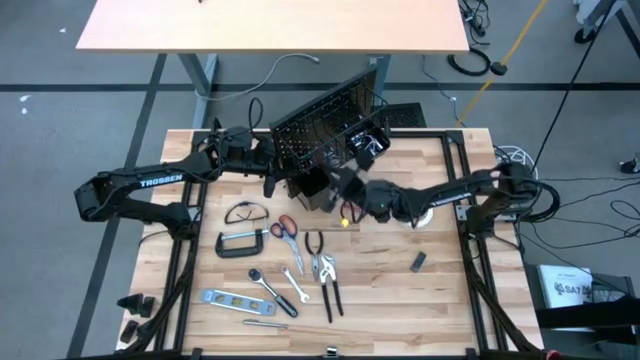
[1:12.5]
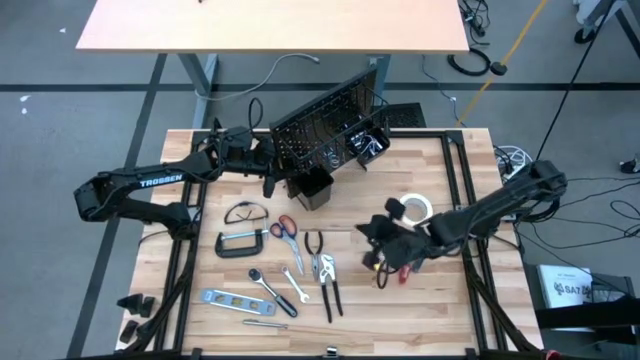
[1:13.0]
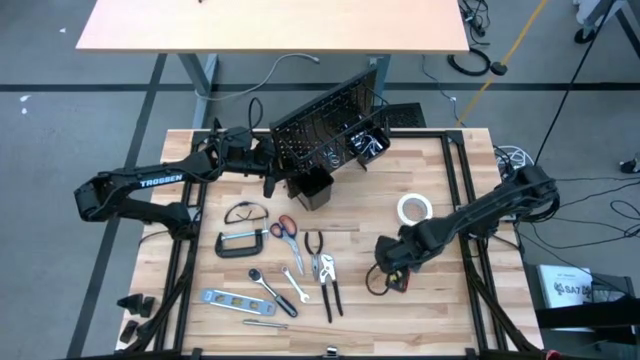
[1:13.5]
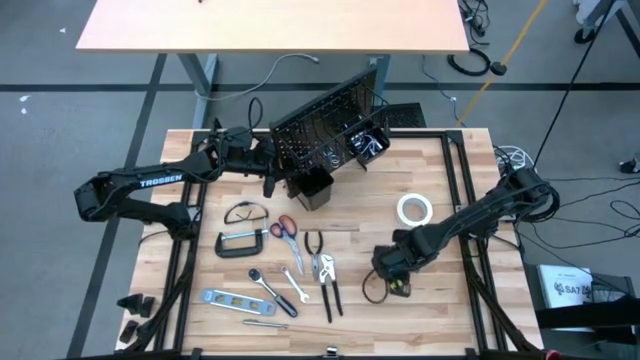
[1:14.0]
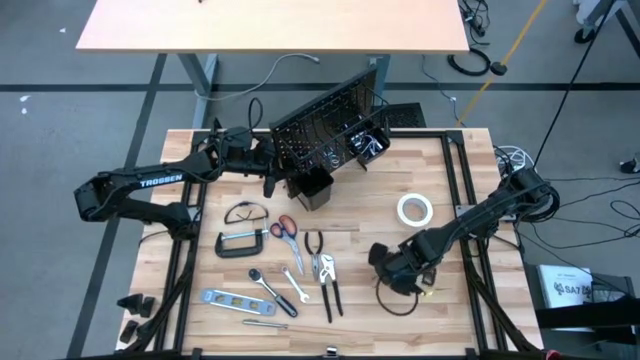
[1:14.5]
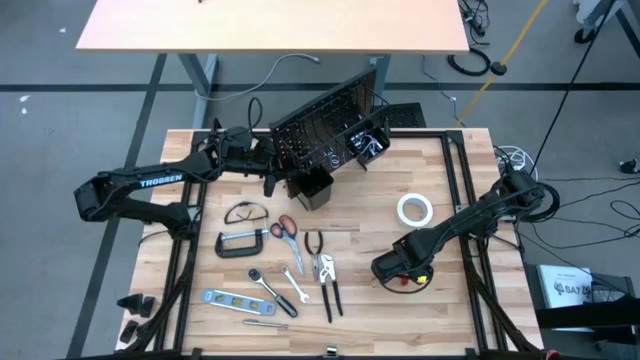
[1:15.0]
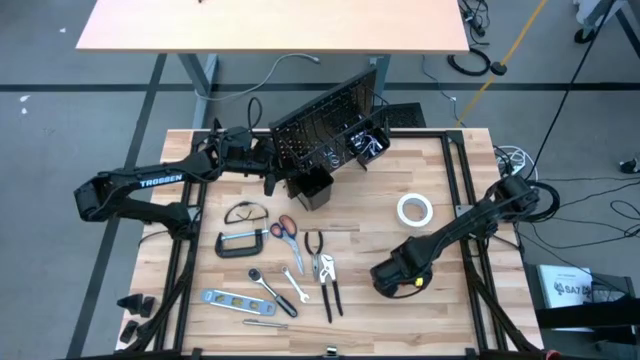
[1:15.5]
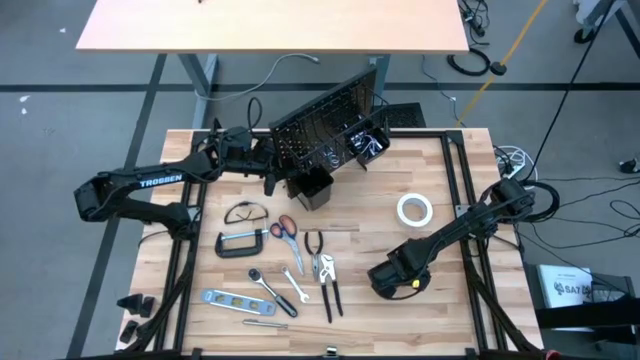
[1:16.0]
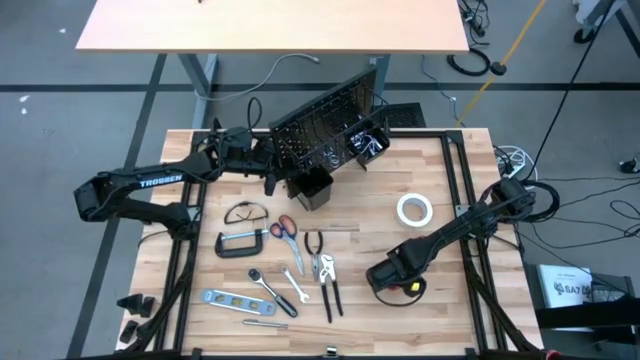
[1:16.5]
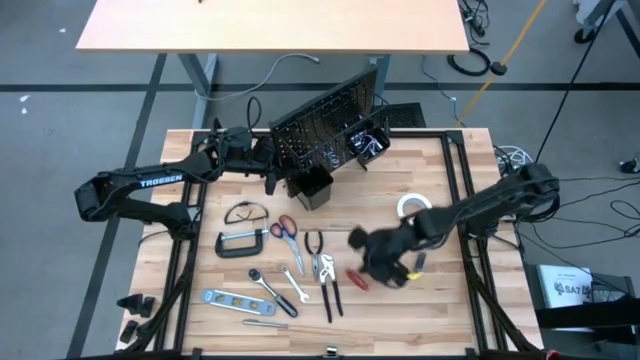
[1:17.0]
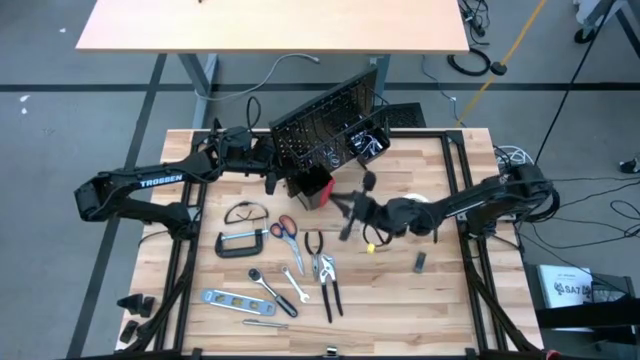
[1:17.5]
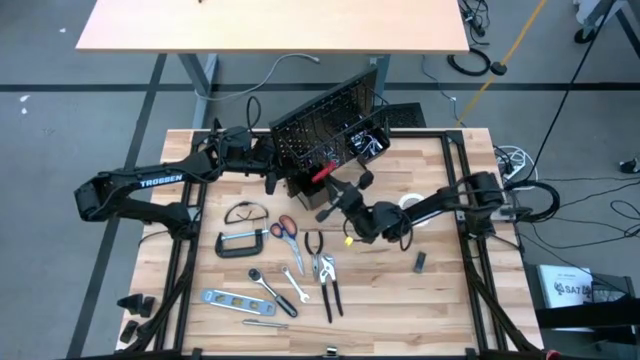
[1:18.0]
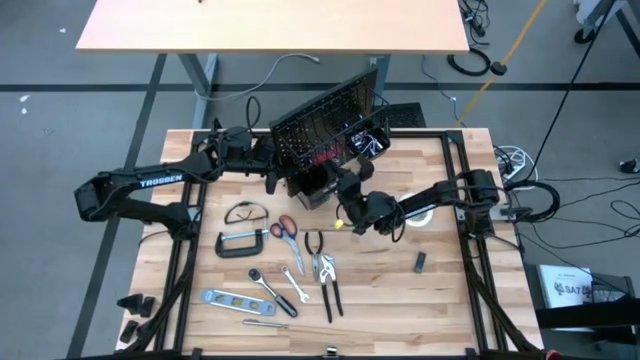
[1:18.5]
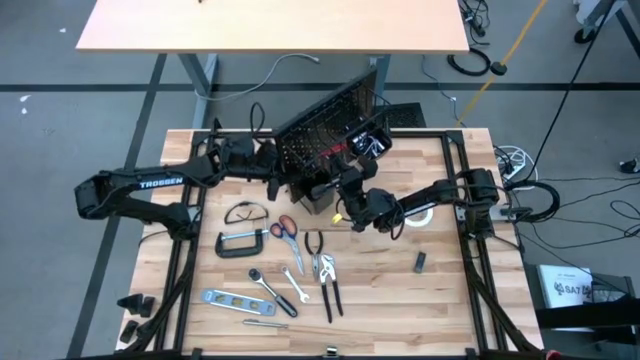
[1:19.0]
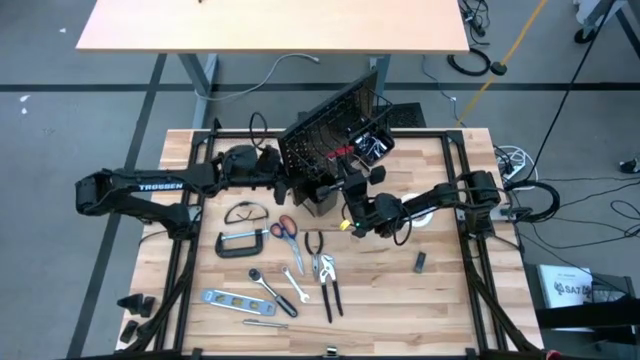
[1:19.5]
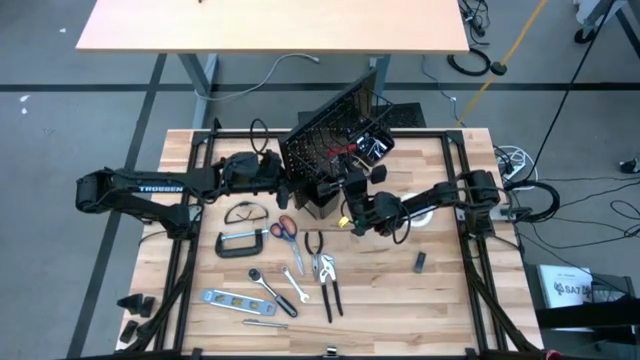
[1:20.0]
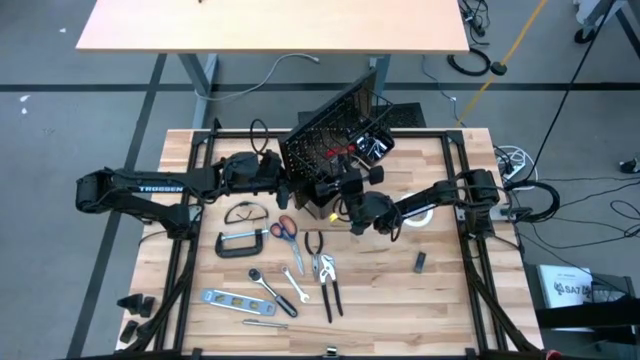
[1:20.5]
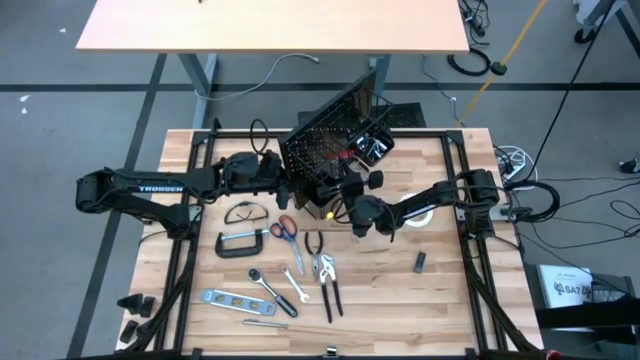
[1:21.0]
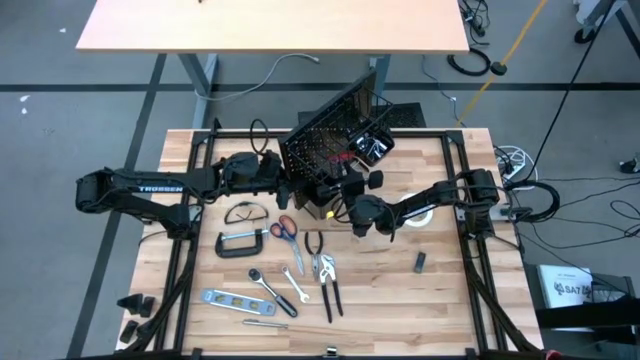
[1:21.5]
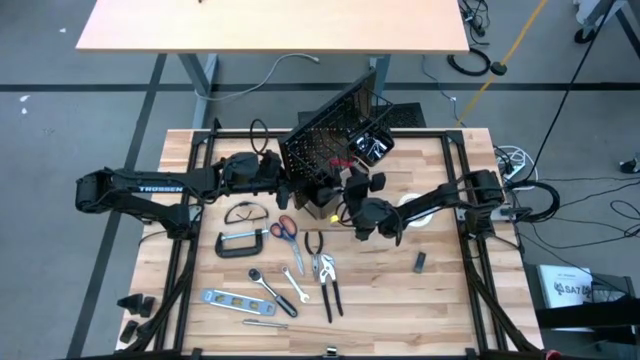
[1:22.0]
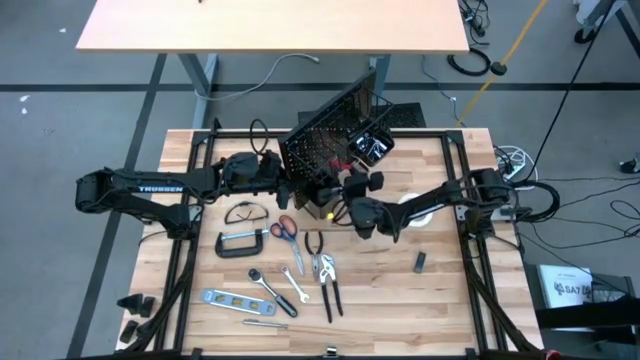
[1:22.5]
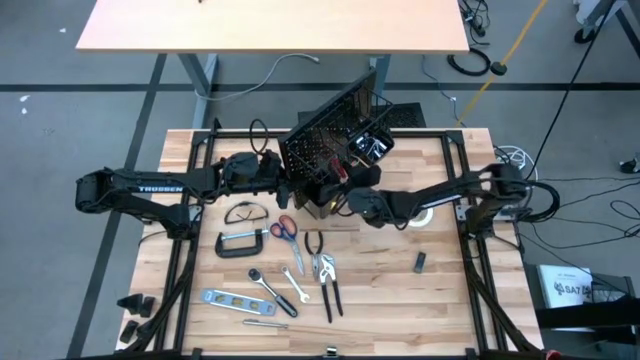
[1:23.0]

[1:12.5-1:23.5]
Task: Hang tools onto peg board
Hang the allen wrench on the peg board

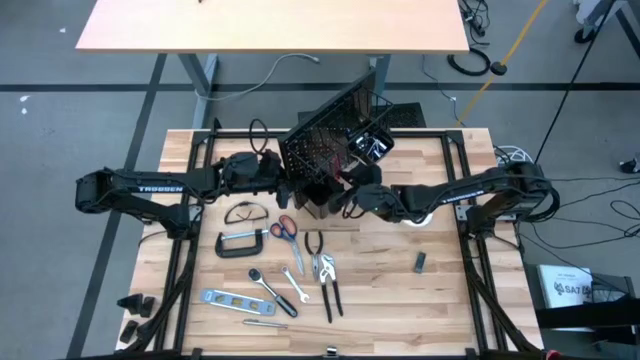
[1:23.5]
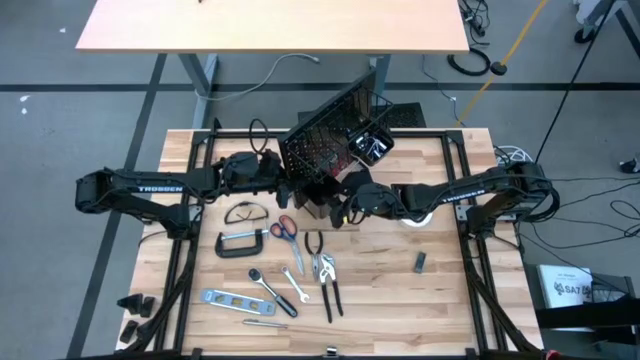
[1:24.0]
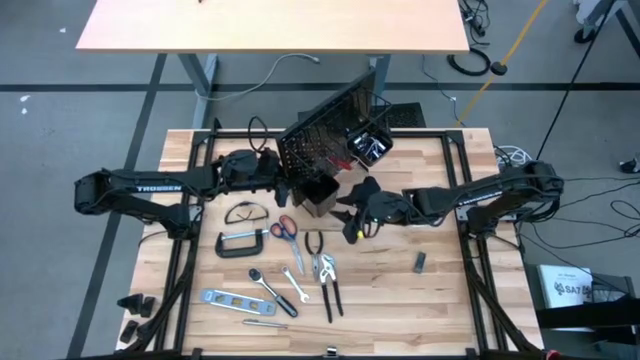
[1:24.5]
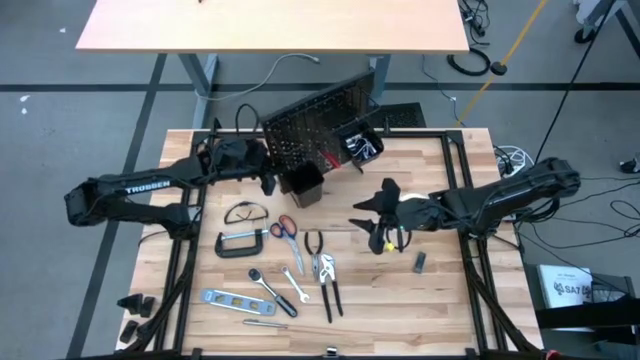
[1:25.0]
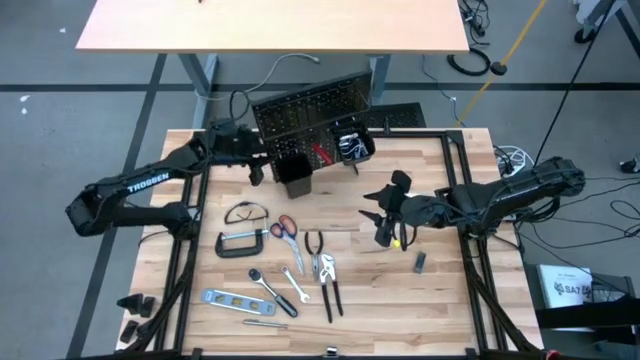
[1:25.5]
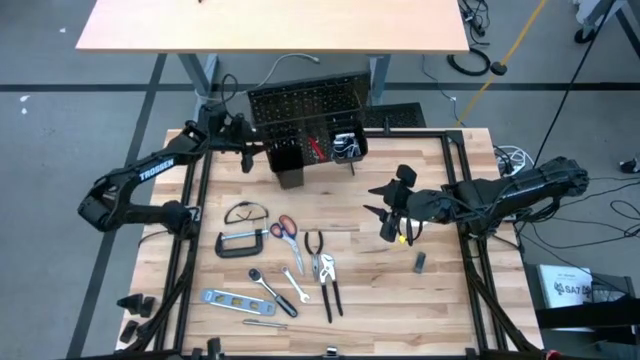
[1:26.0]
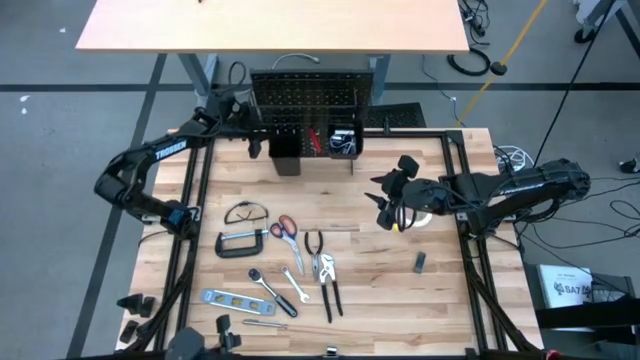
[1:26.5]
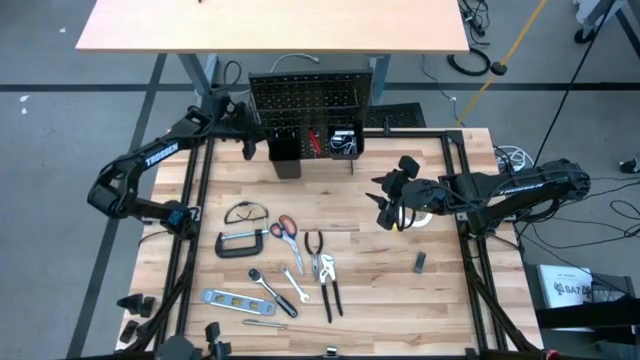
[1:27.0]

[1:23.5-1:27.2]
Adjust the peg board

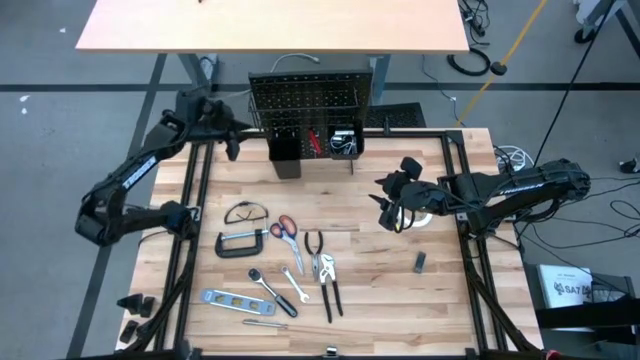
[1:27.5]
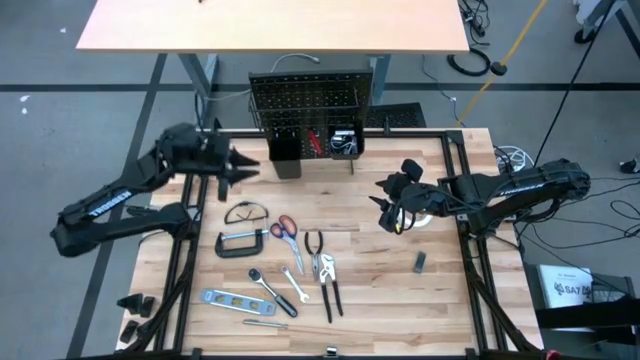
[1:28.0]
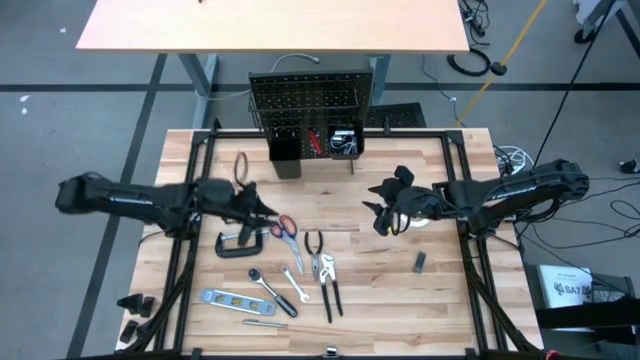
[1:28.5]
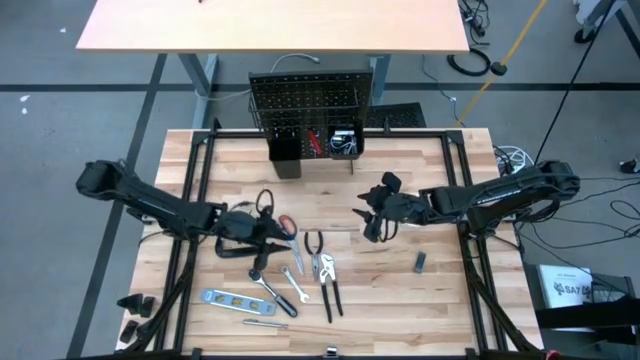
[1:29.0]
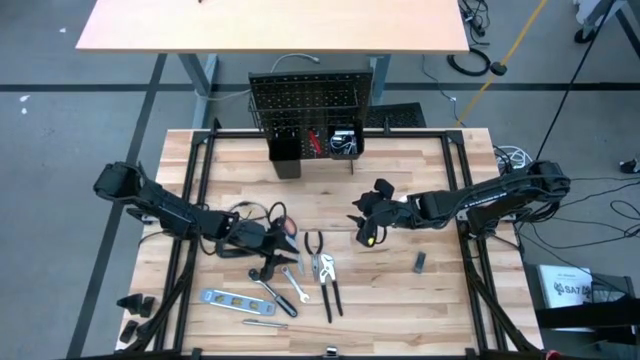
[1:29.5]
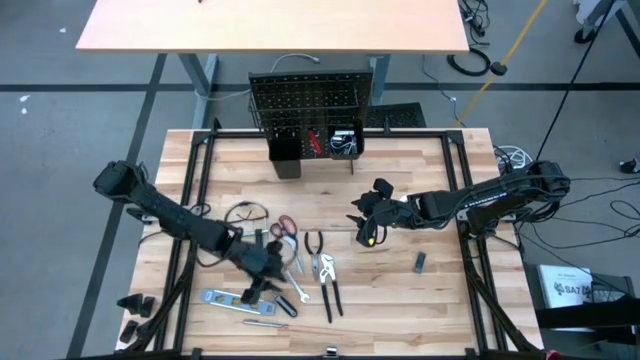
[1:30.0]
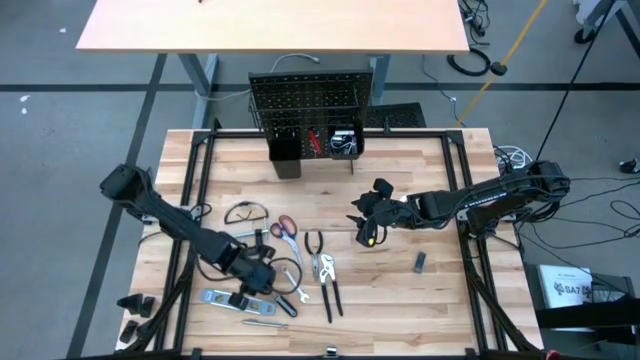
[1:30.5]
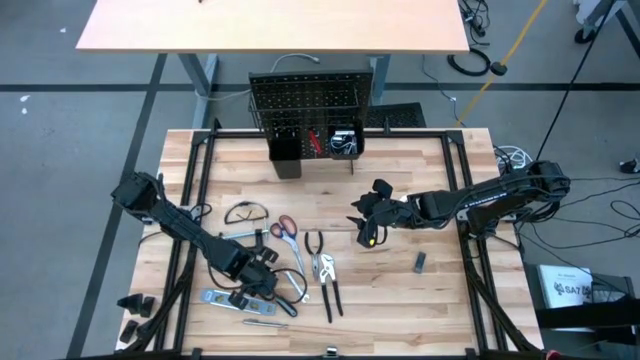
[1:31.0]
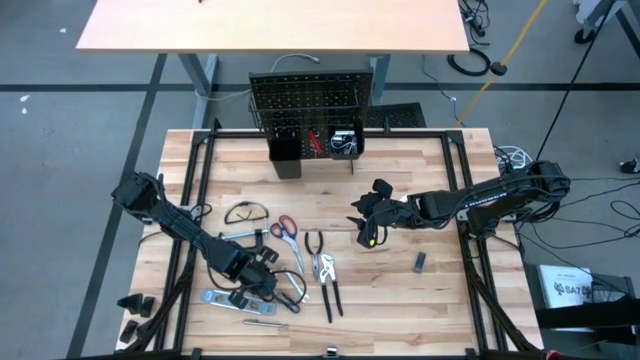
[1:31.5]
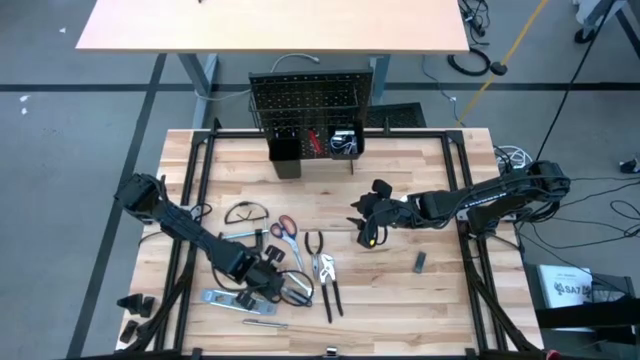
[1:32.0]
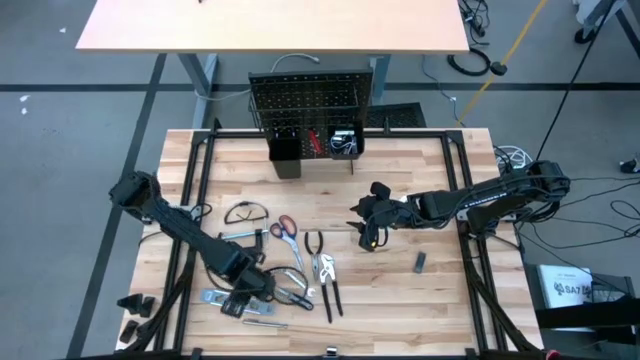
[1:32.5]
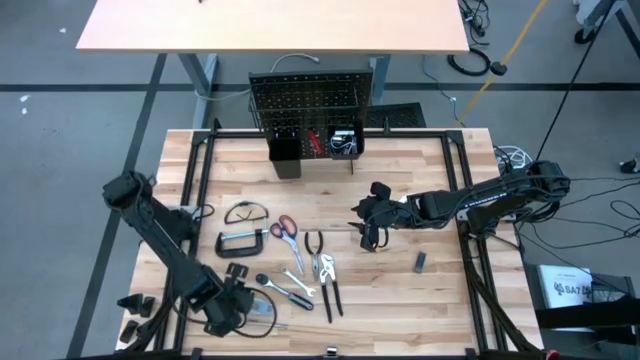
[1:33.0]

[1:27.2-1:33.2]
Adjust the ratchet wrench on the table

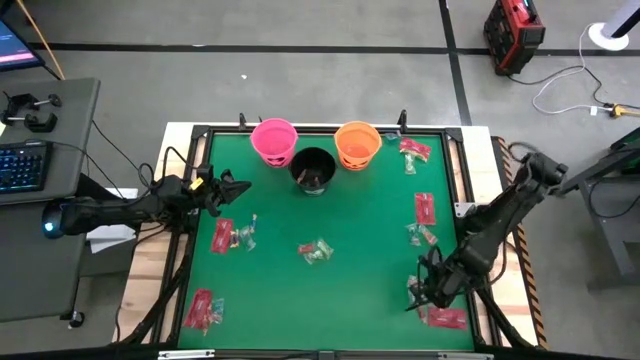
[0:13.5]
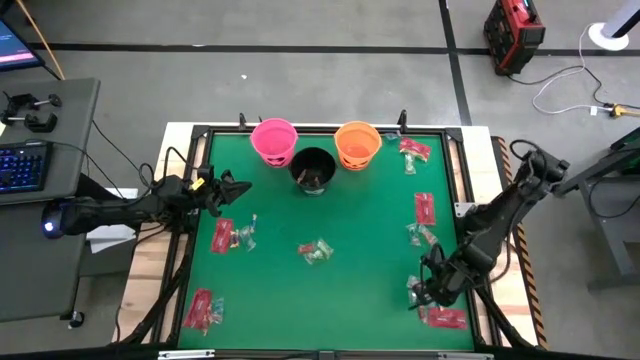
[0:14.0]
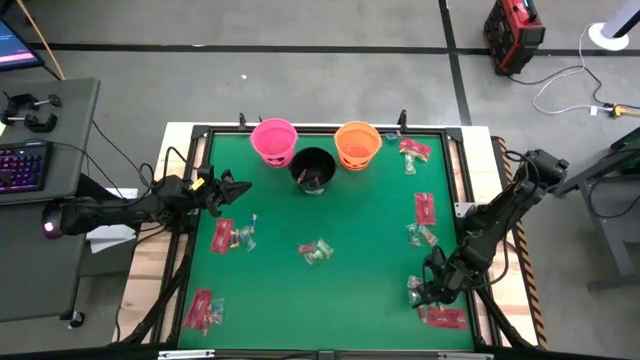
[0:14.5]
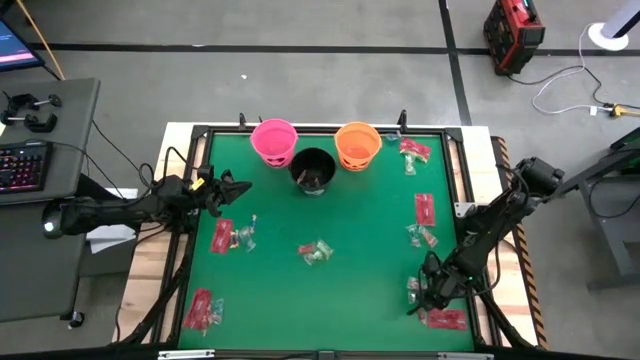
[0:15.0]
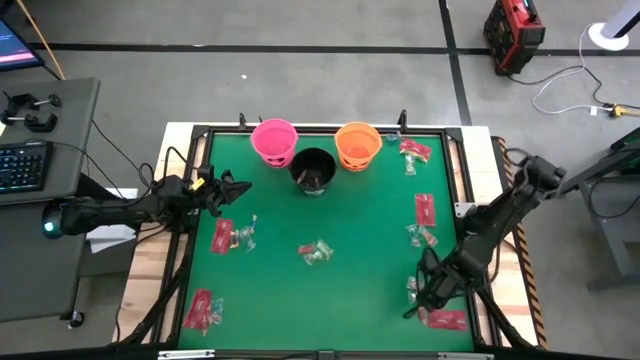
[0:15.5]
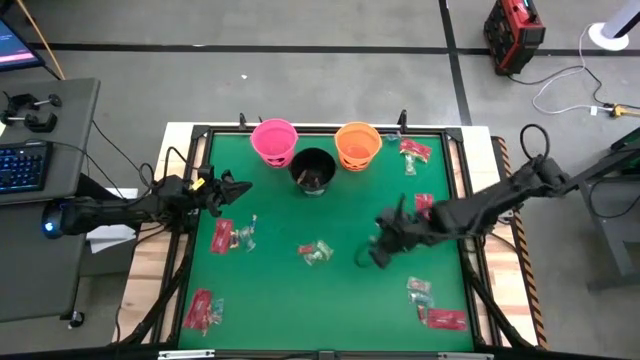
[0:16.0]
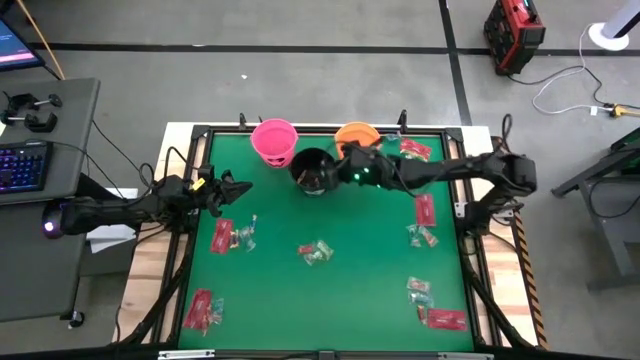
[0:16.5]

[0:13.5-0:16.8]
Task: Sort candy by brand, put in halloween buckets
Put the blue candy into the black bucket
